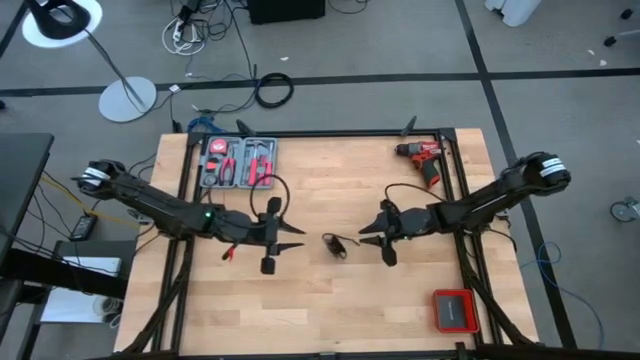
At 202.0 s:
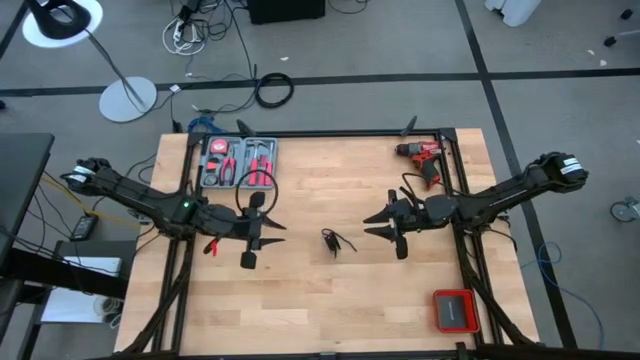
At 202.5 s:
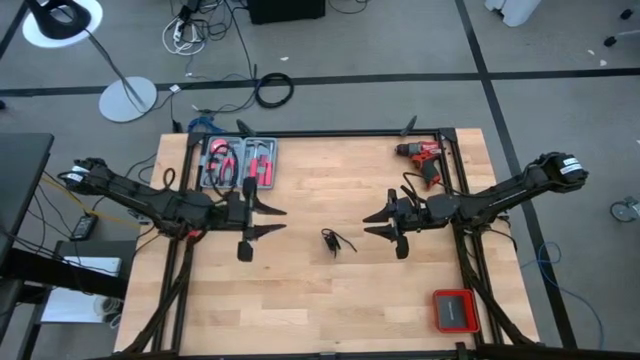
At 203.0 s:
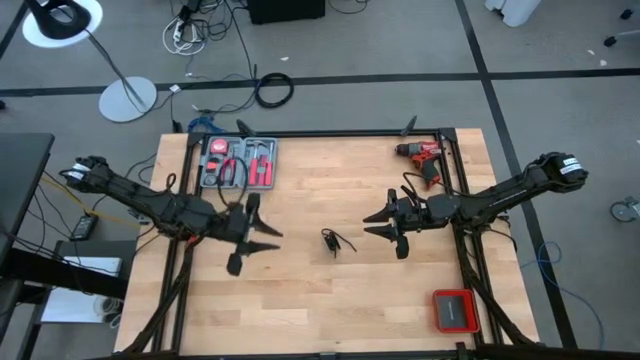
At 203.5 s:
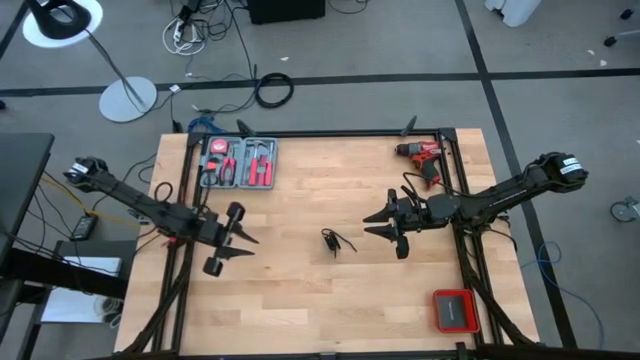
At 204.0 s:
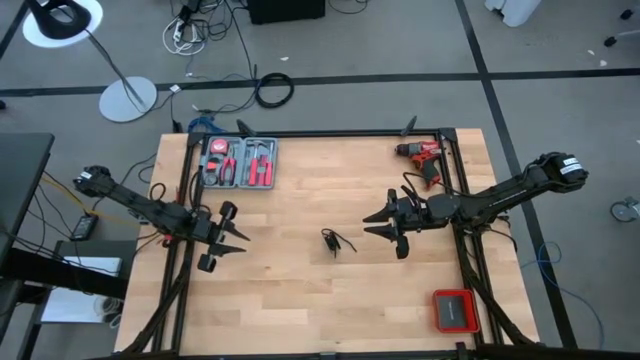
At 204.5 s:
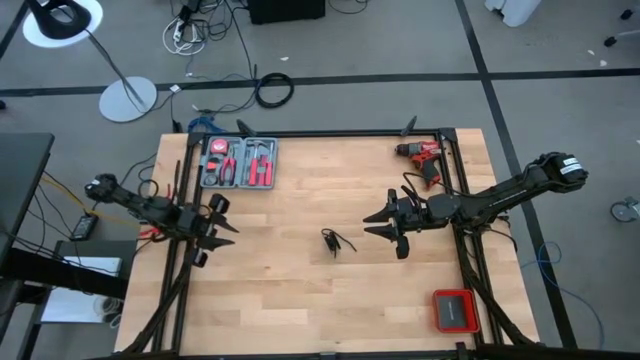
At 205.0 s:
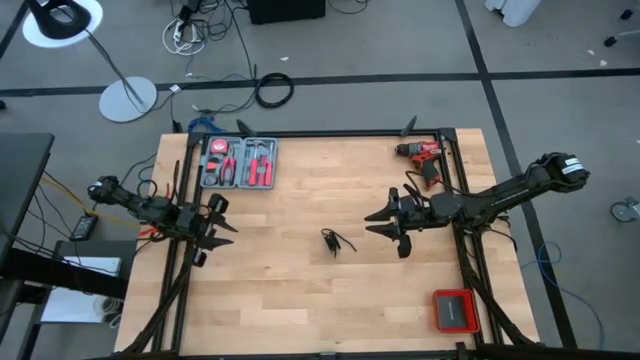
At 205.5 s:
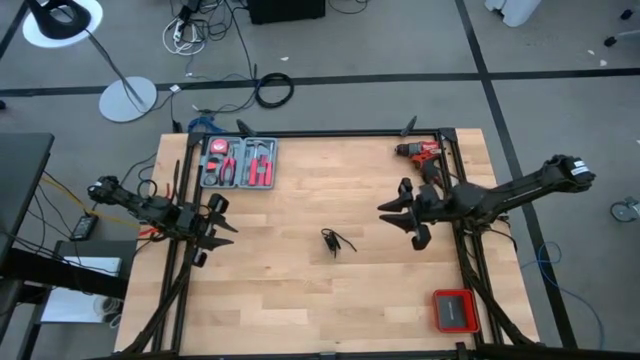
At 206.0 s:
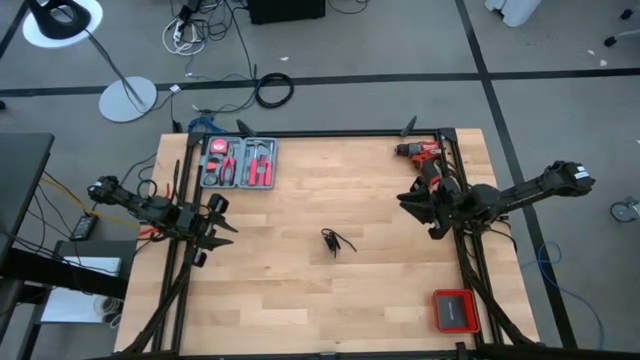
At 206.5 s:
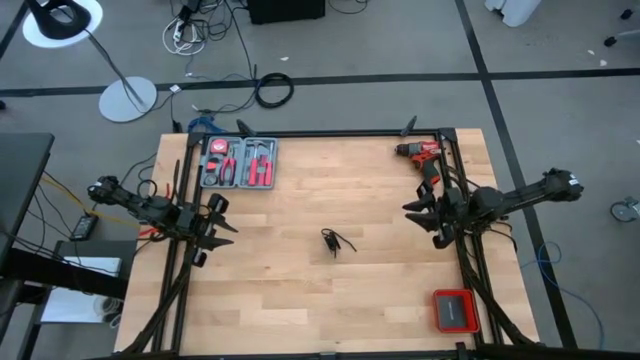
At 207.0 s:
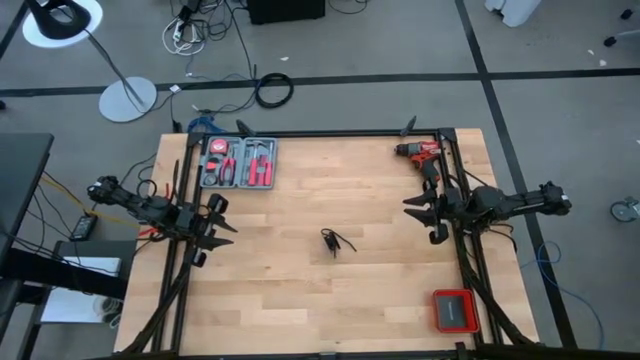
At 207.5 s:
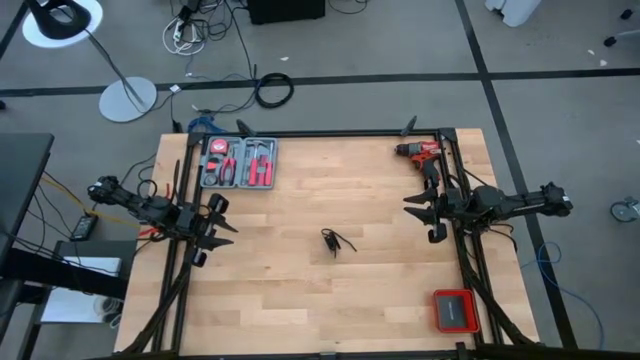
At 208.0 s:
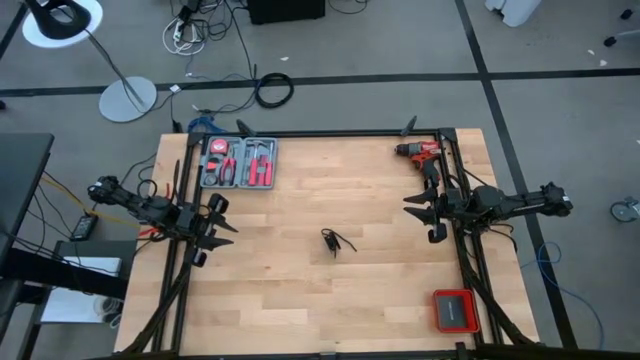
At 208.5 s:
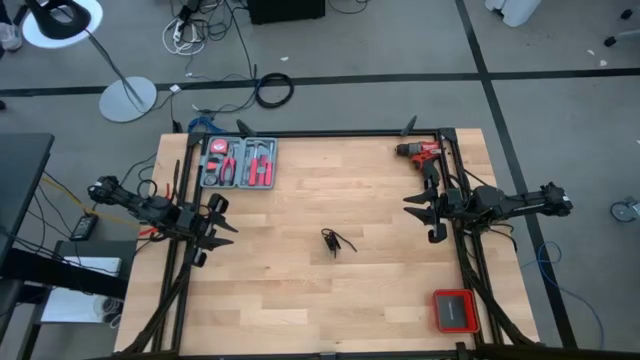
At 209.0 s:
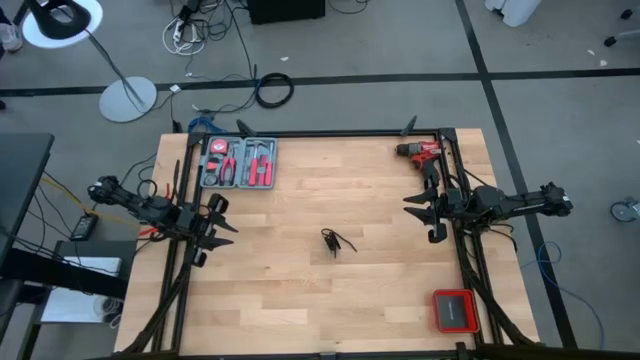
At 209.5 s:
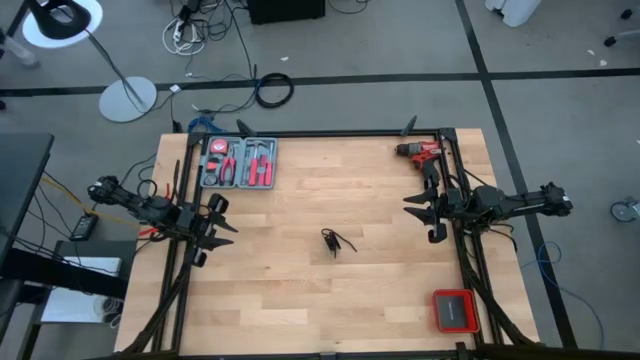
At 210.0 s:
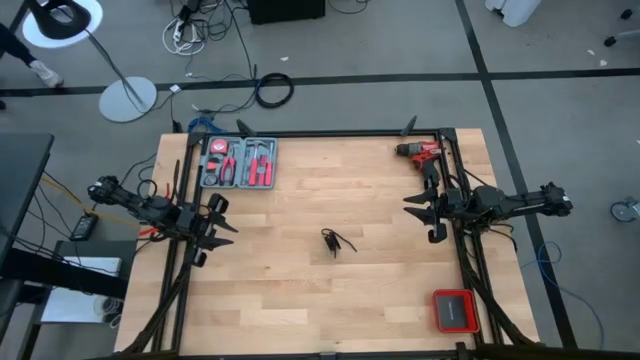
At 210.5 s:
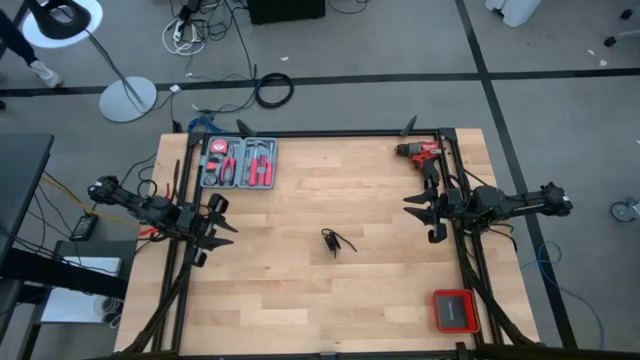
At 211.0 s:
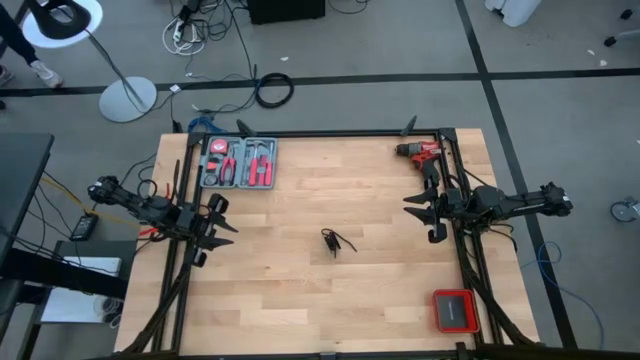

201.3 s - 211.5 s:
Task: Coil cords
Return to Home Position

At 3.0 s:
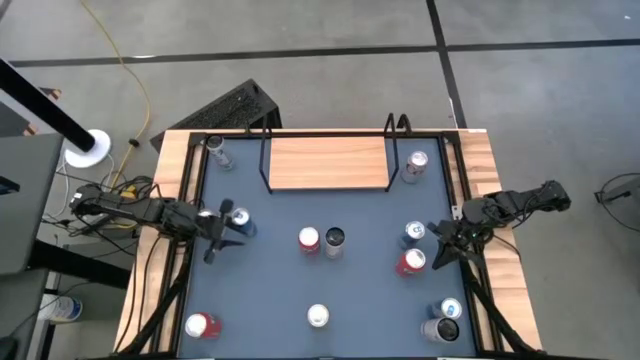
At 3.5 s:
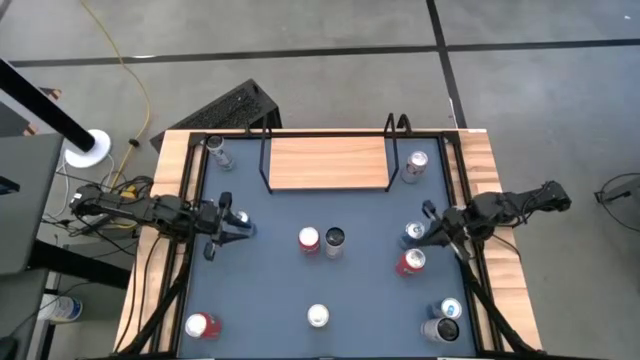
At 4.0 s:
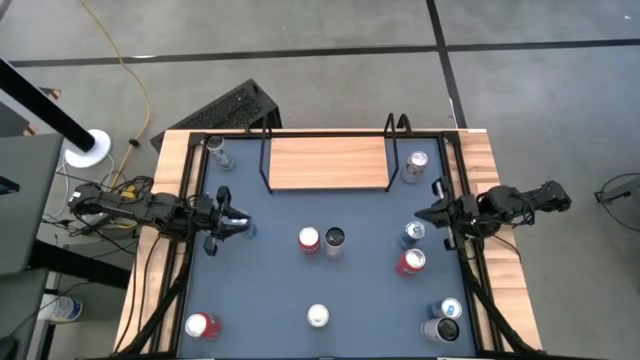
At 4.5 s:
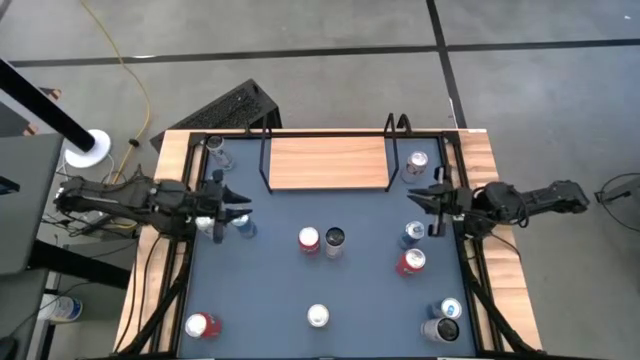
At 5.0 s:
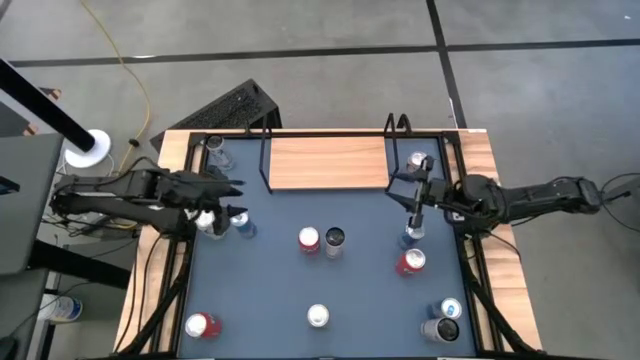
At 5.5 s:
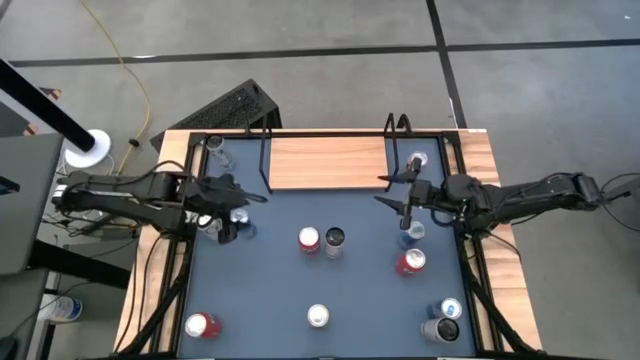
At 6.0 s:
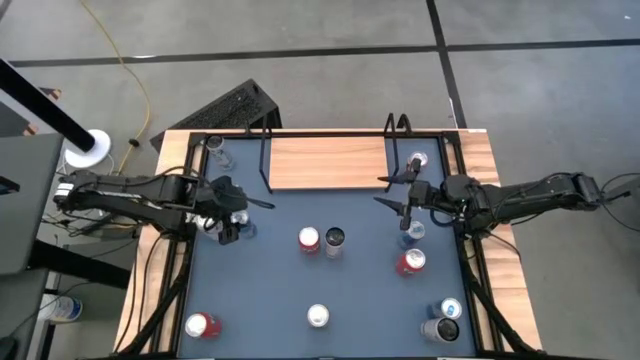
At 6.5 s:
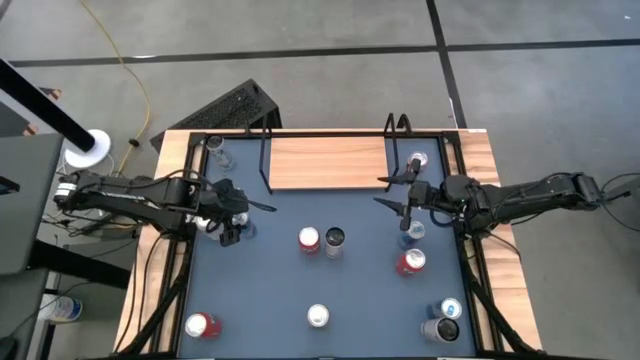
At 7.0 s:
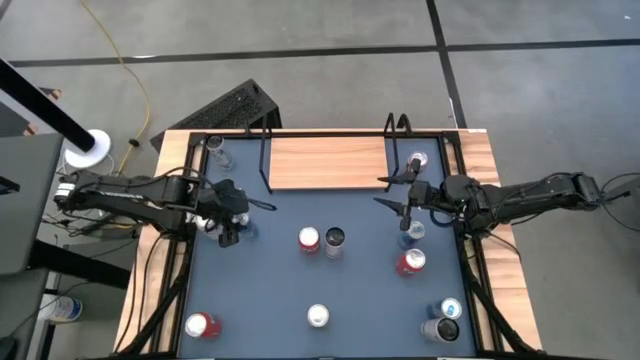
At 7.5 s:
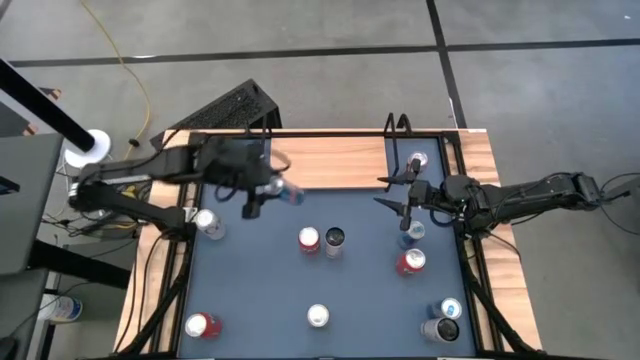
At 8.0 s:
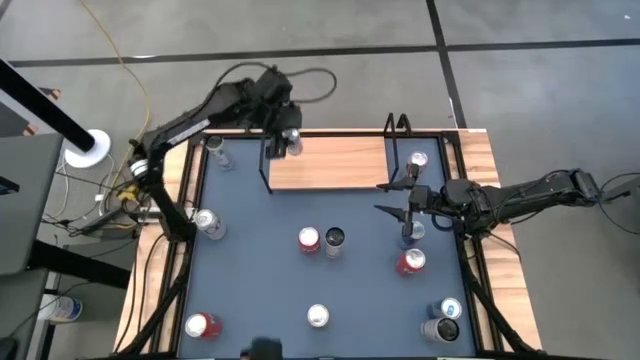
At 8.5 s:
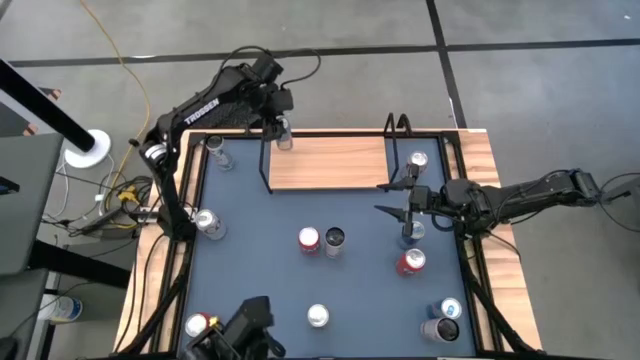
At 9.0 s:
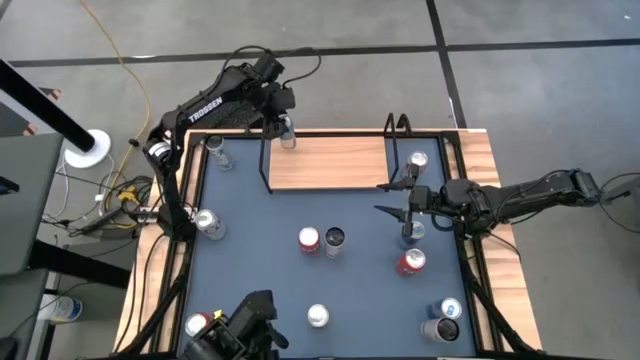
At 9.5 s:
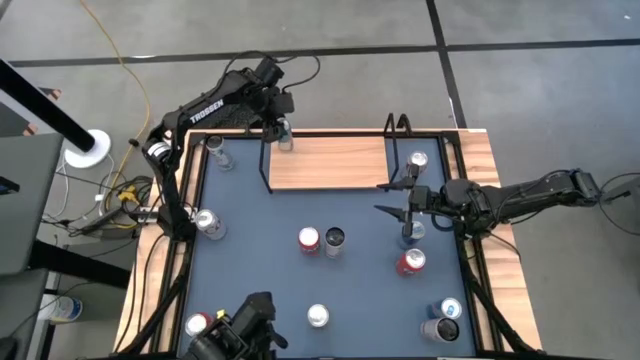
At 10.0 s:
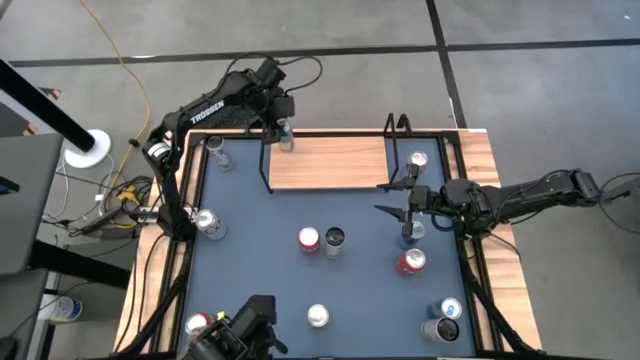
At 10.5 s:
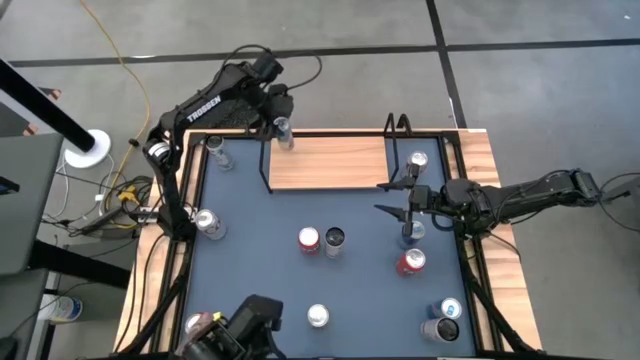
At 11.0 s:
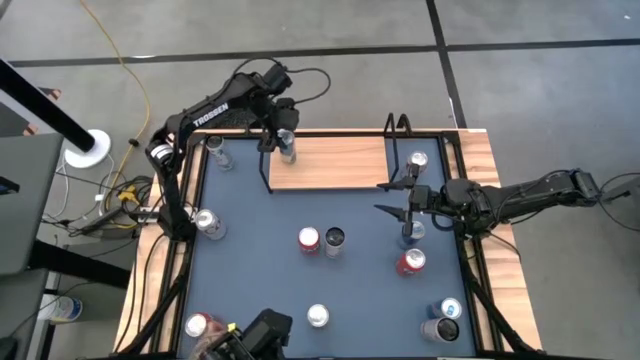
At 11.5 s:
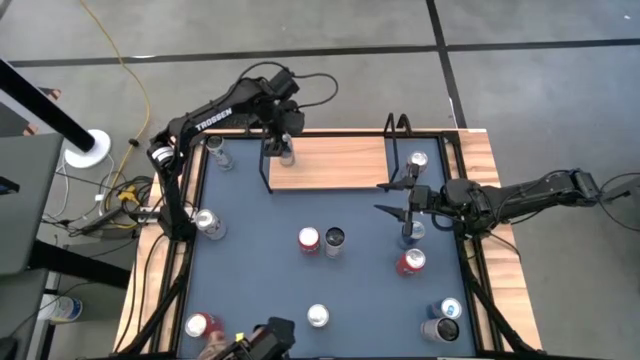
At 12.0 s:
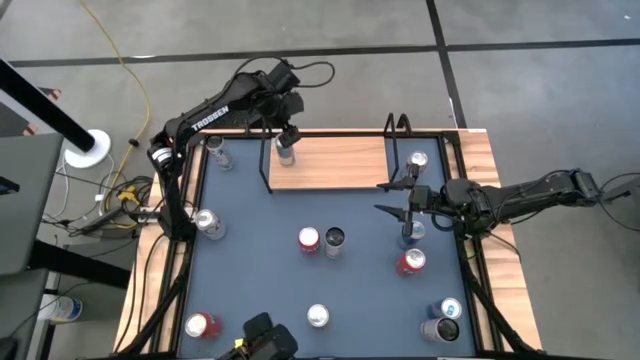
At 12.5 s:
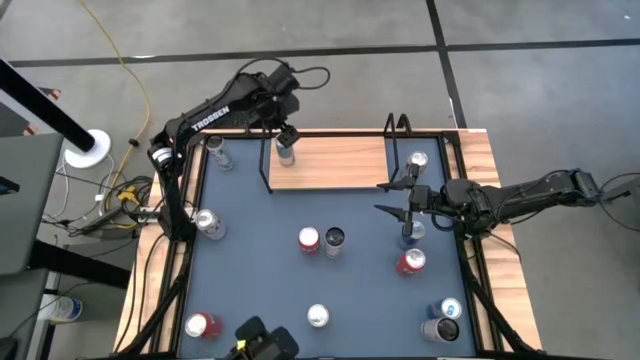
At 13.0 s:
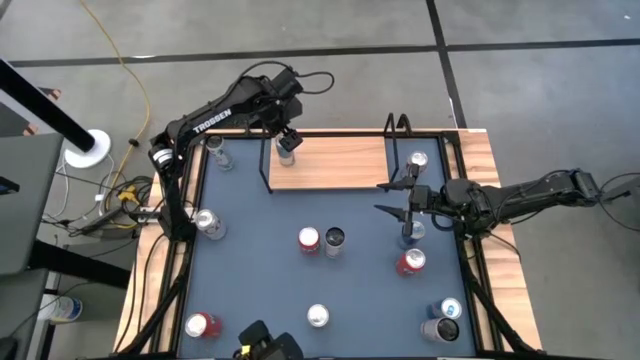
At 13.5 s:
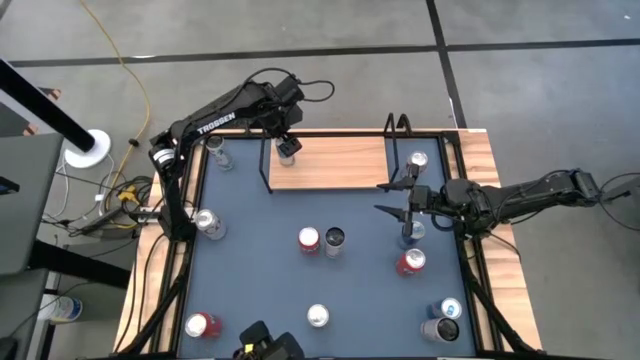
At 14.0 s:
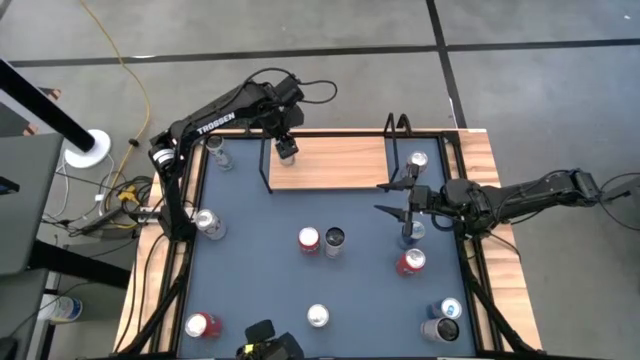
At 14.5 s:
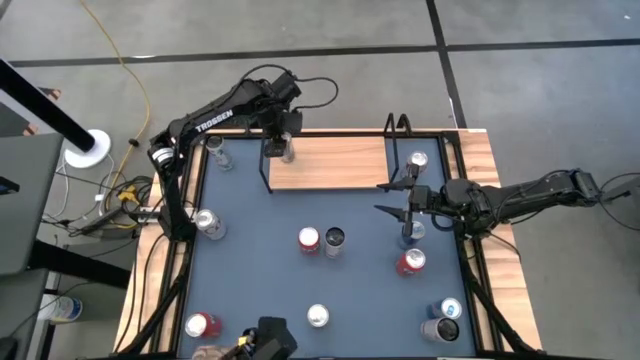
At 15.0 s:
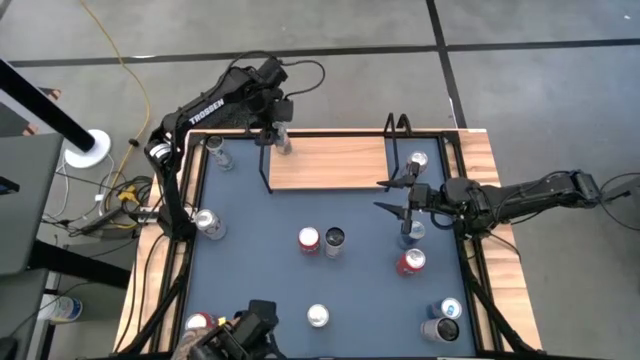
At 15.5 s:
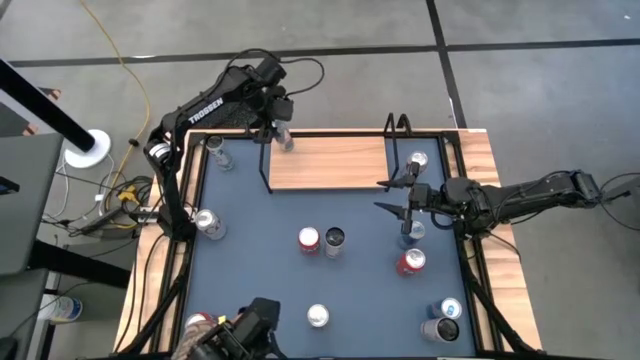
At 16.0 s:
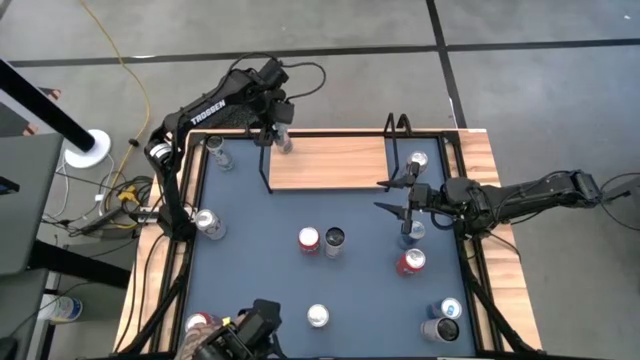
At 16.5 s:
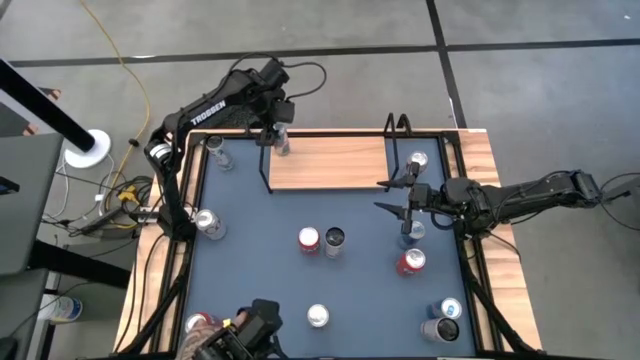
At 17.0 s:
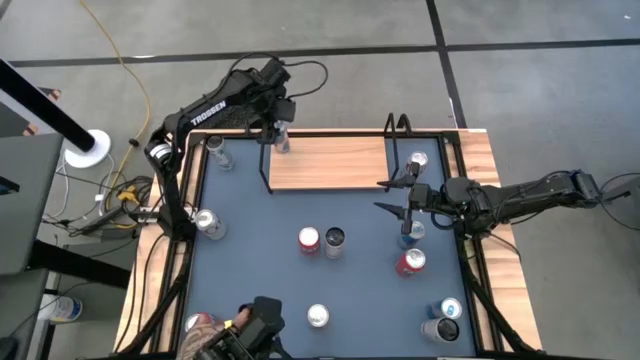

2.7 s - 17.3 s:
Task: Place canned beverage on shelf
Put the top left blue soda can onto the shelf
